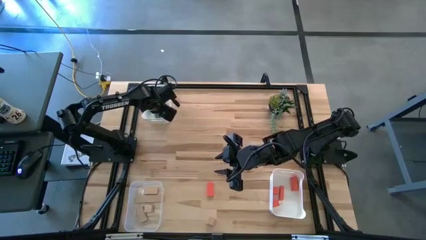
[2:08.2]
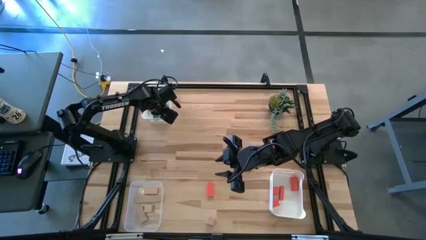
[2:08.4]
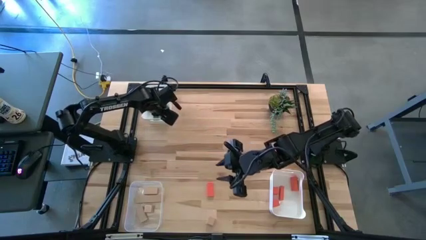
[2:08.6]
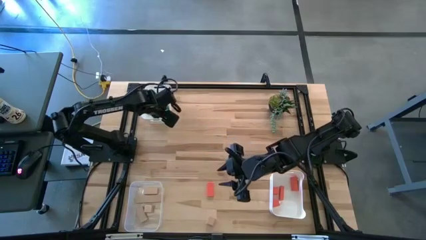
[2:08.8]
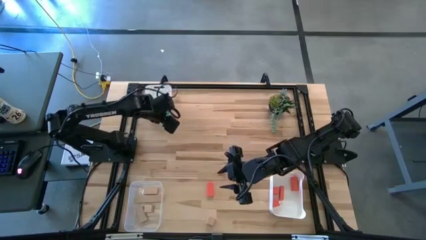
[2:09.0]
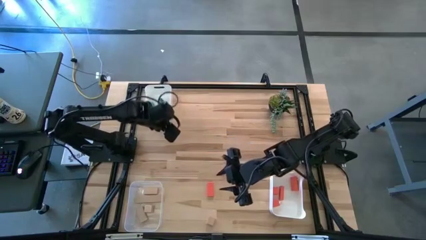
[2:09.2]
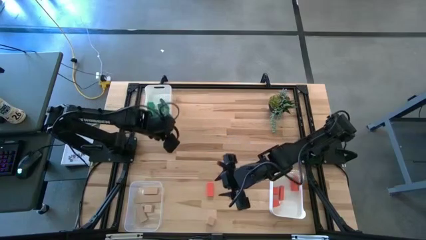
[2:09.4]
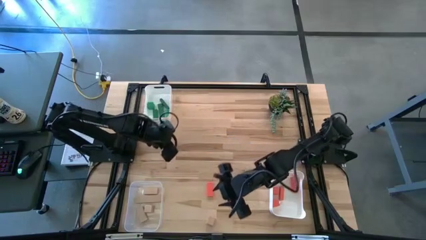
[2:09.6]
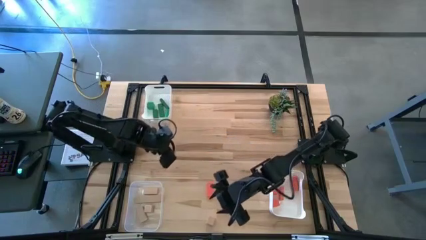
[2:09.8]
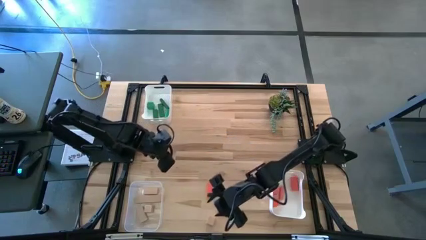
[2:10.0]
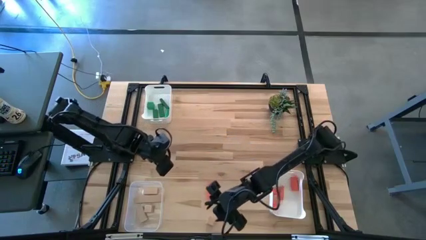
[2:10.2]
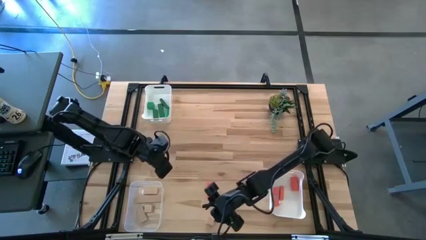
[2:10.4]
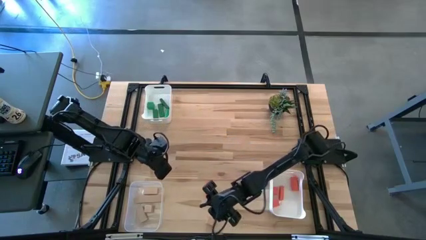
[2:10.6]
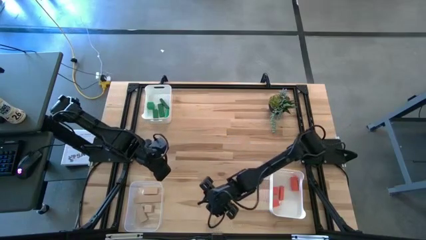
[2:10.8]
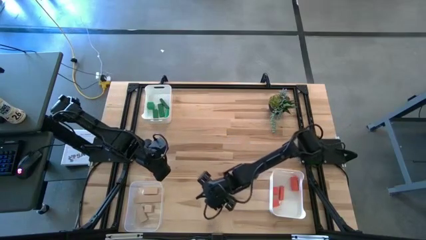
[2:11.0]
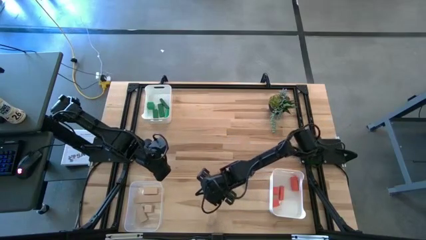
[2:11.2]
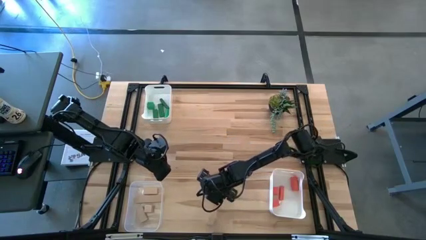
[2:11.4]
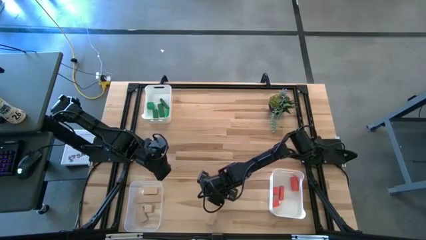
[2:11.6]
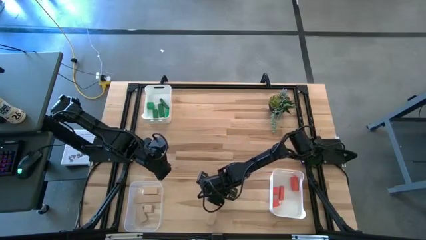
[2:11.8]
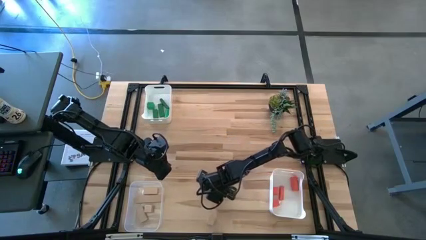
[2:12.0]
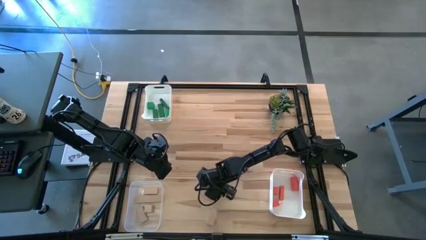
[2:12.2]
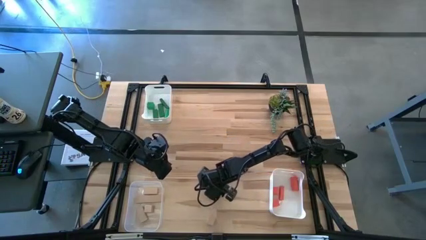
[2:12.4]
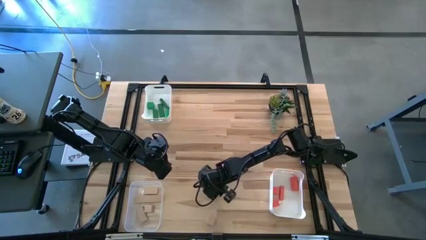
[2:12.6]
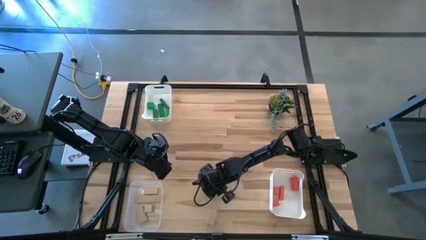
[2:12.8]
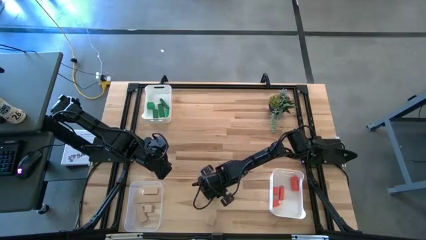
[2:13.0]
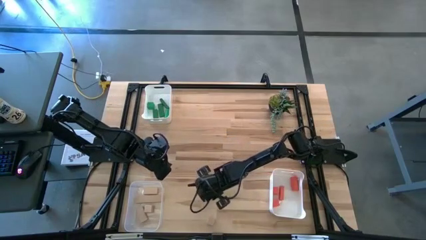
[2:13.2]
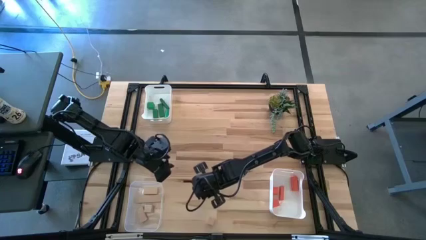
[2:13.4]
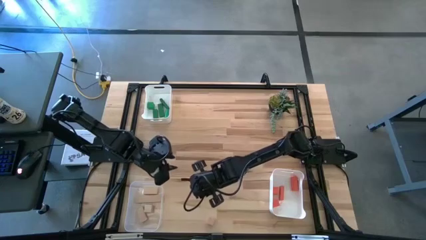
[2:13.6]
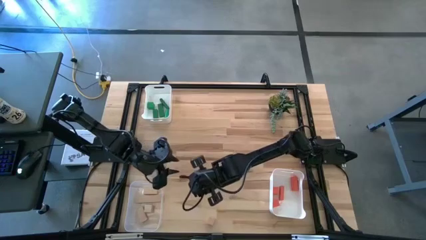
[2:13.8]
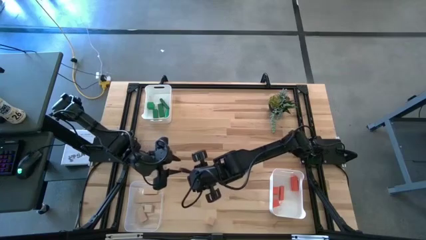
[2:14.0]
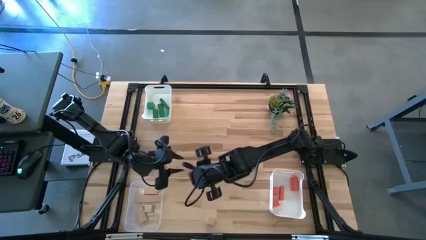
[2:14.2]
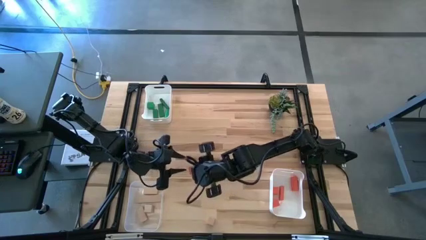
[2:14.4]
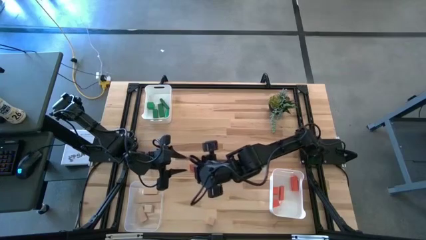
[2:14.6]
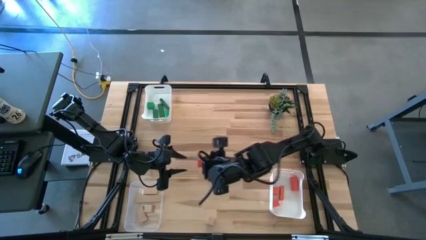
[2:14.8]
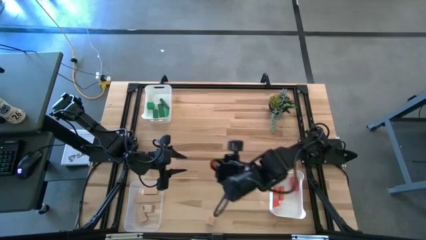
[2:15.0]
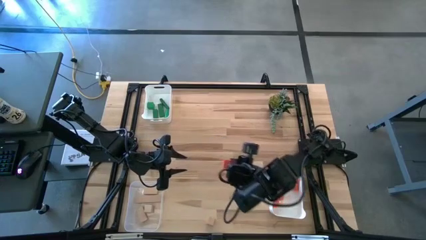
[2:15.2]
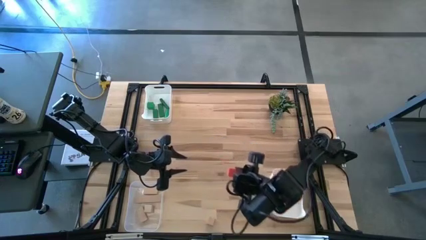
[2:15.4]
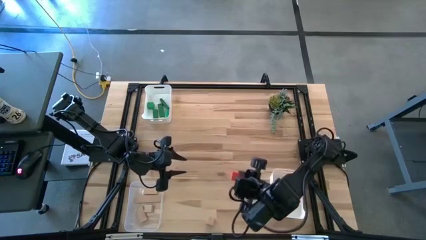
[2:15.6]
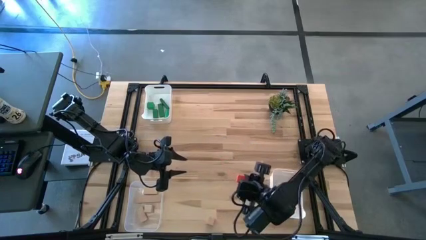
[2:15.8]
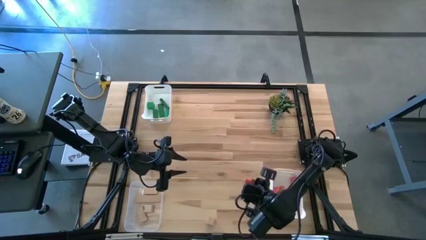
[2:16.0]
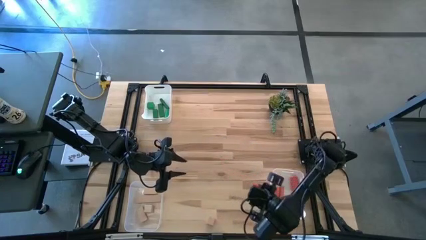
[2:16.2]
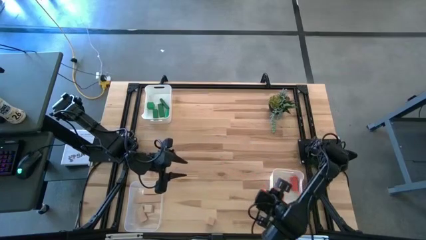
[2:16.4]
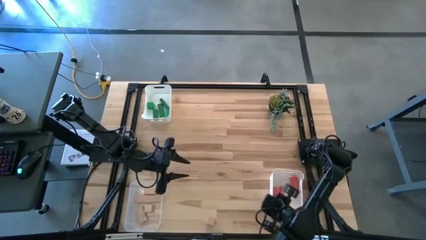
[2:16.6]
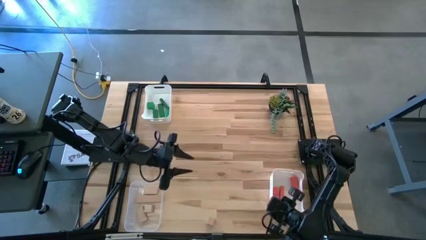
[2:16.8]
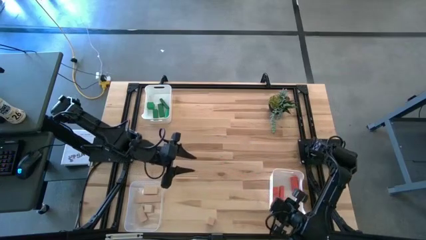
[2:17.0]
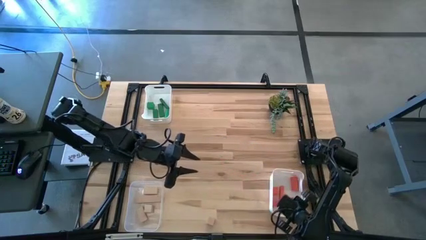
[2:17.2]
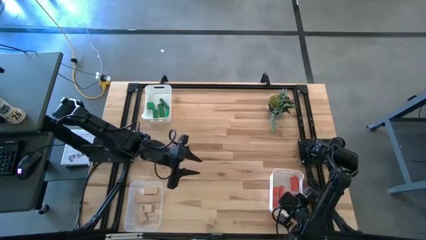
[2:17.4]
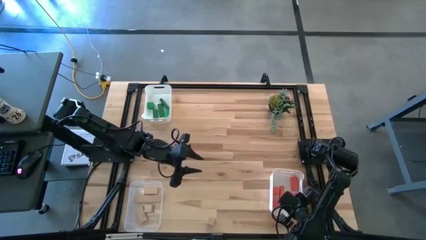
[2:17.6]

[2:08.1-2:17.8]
Task: Sort & place blocks by color
Put the orange block into the bottom white bin

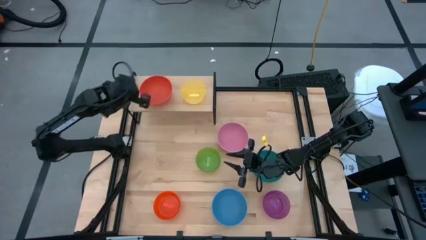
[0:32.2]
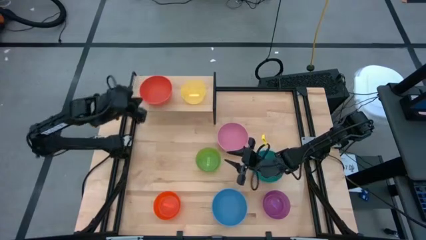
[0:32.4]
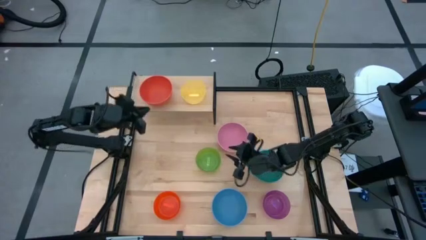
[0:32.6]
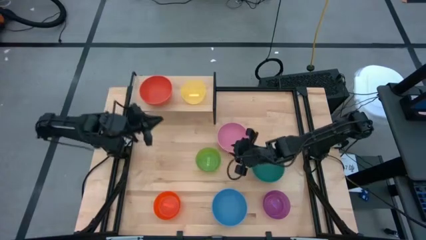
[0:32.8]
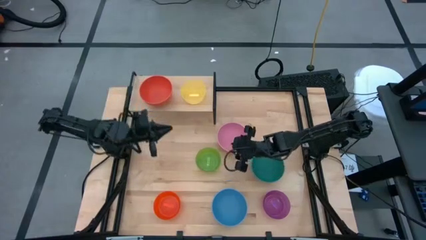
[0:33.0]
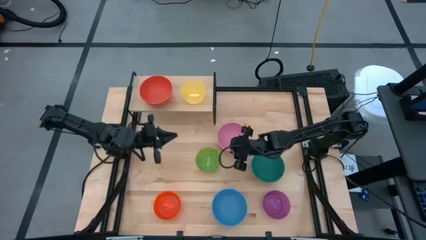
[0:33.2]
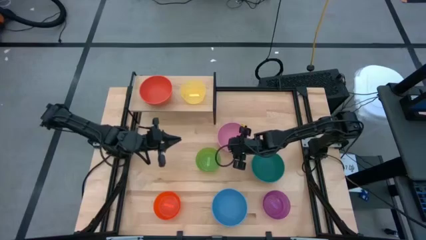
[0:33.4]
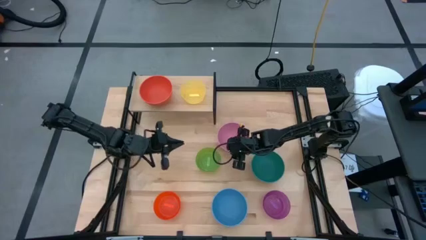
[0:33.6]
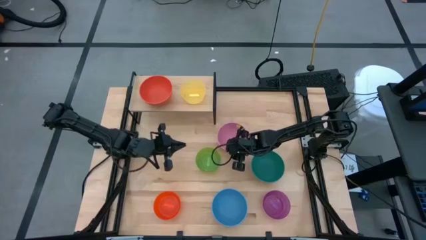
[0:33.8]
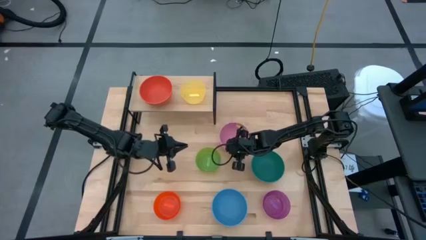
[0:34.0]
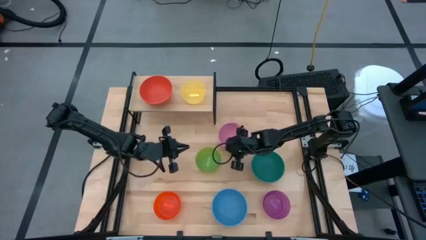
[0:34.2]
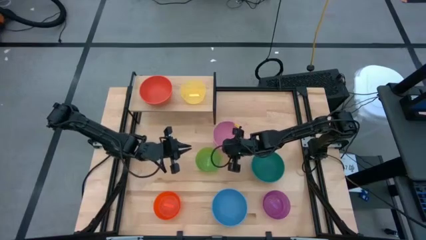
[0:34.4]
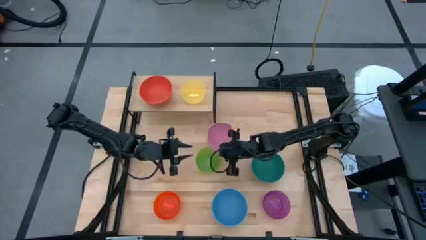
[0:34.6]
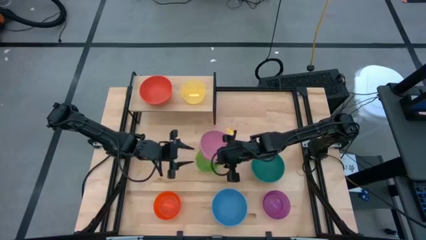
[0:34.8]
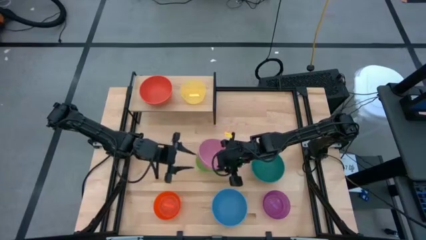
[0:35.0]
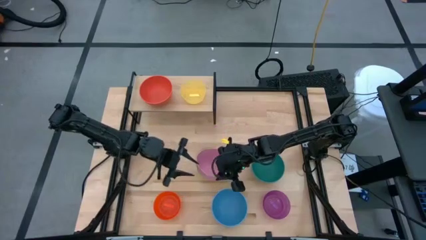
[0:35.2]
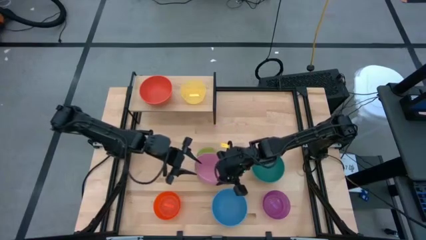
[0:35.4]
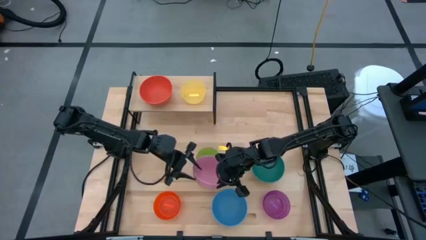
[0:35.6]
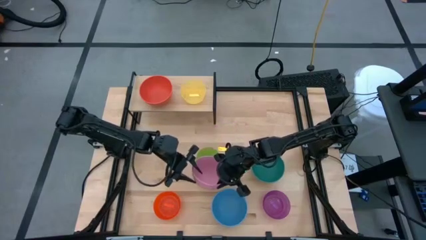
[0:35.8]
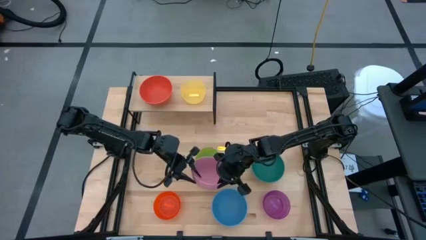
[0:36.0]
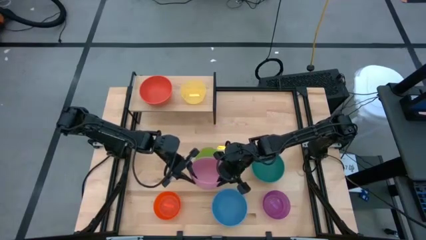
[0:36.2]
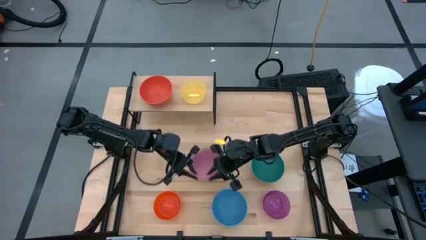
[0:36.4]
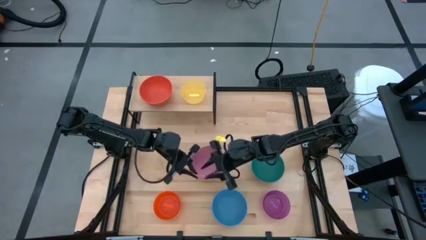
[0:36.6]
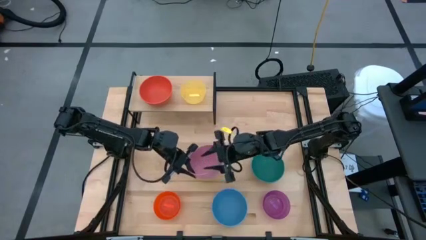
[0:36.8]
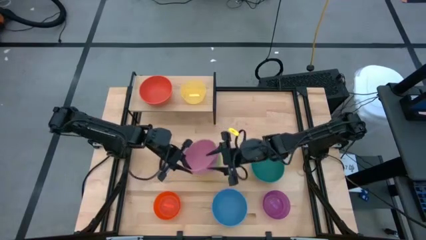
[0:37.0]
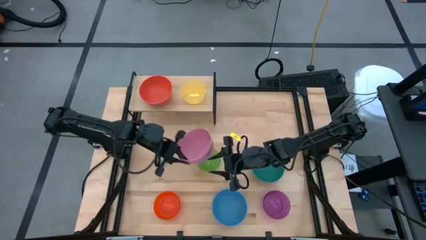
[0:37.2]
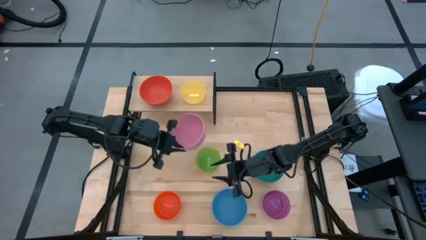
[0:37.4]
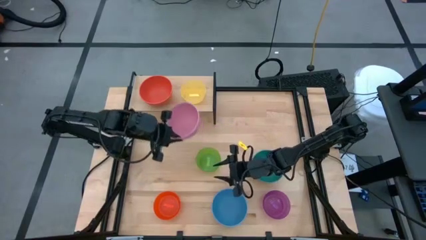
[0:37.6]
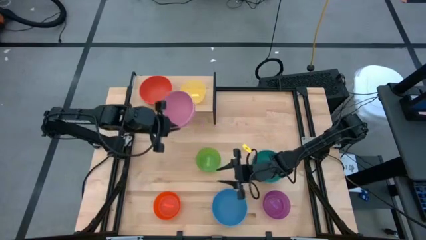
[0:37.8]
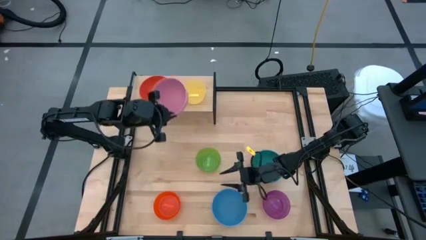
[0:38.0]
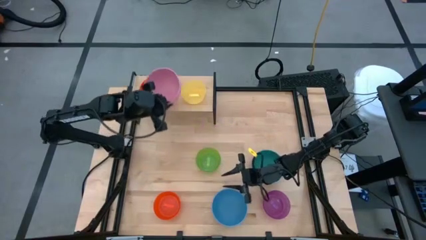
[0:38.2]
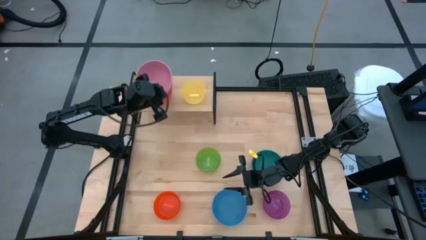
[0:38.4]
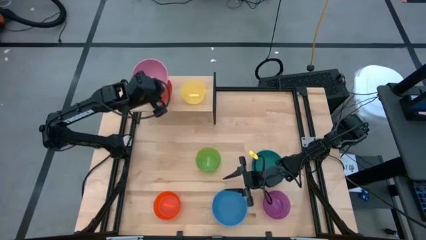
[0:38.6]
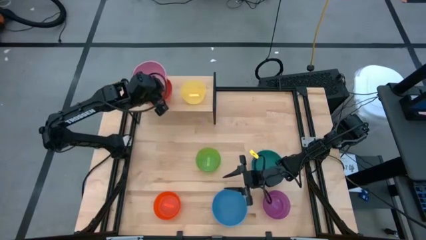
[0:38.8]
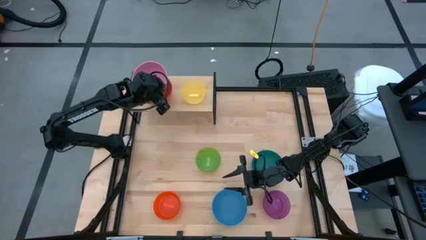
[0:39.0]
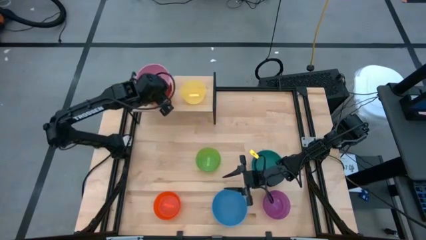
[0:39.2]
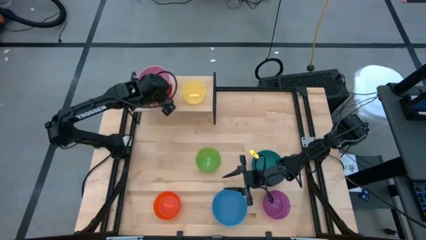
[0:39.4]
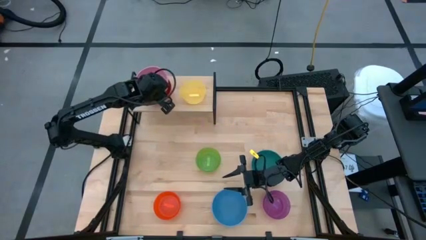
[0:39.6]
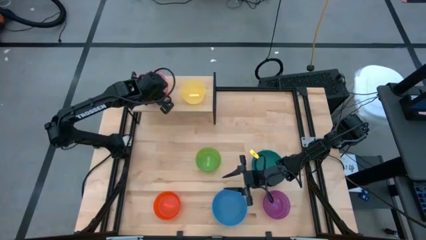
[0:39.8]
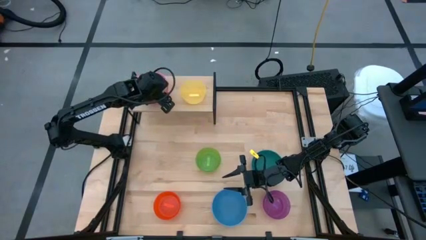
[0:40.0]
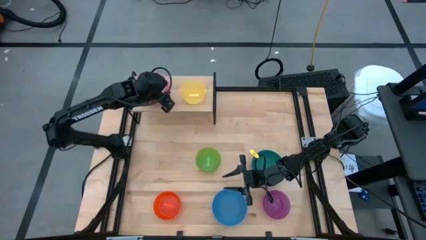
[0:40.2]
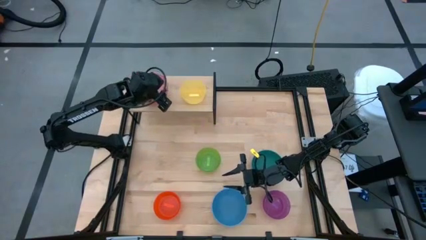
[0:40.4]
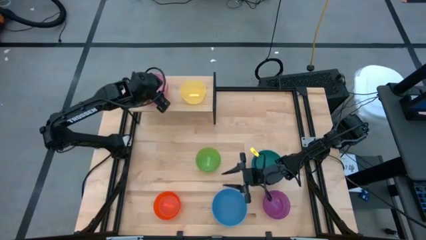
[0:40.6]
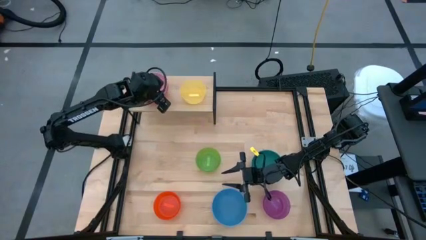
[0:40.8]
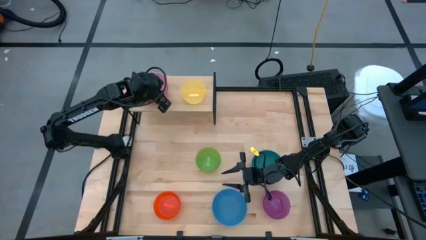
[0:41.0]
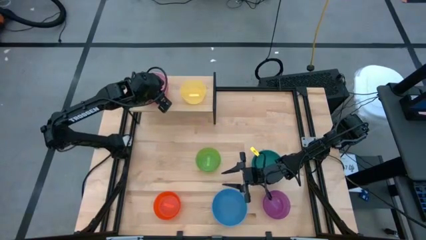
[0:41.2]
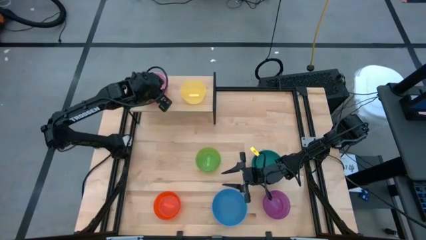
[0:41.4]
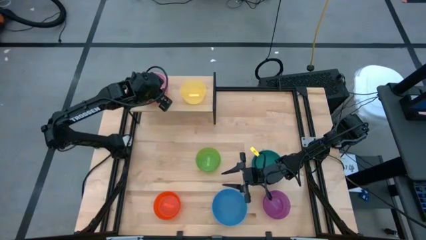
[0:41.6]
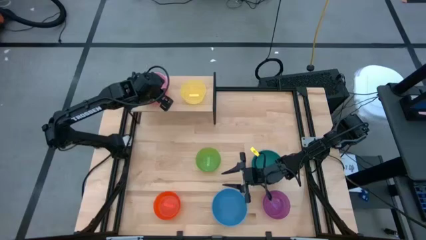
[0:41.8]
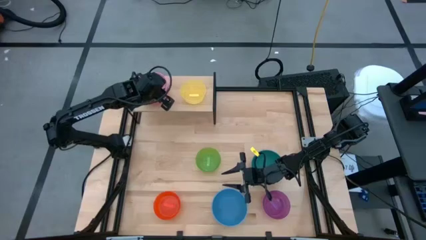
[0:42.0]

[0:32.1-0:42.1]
Task: Place and stack bowls onto a shelf
Stack the pink bowl into the orange bowl on the shelf
